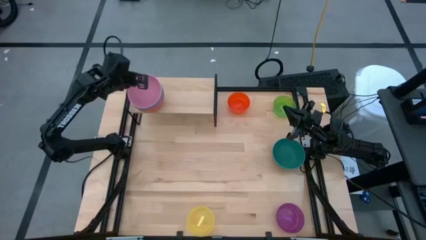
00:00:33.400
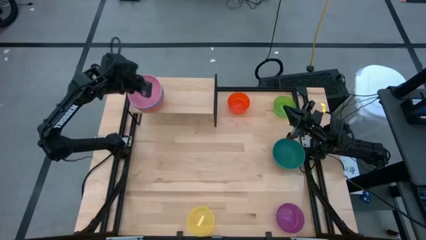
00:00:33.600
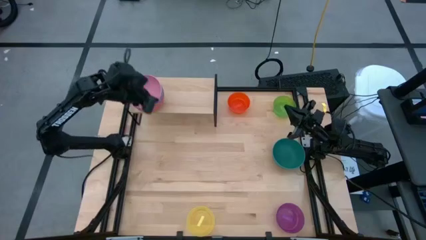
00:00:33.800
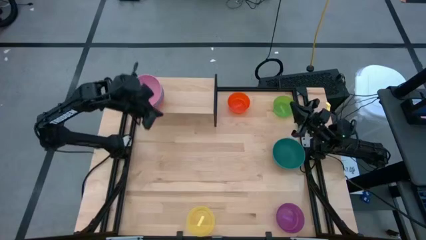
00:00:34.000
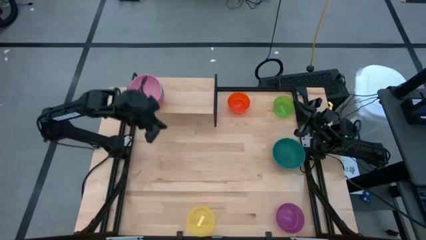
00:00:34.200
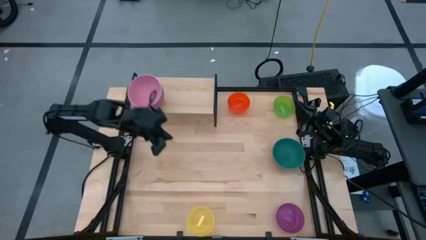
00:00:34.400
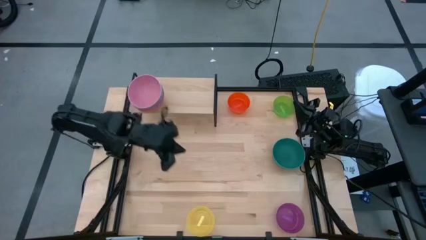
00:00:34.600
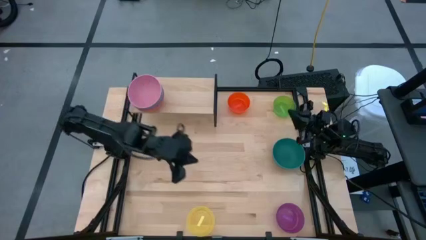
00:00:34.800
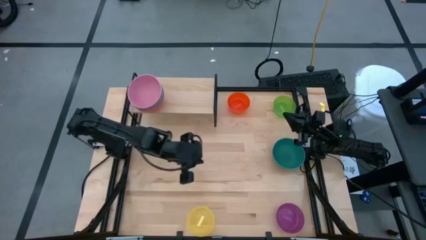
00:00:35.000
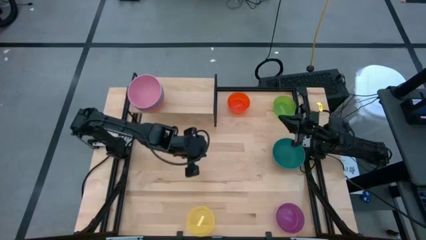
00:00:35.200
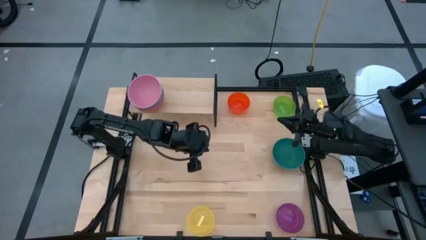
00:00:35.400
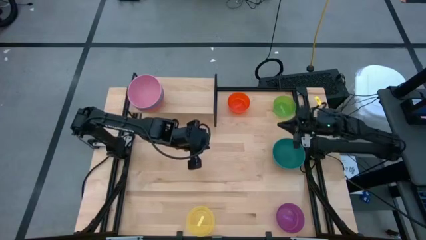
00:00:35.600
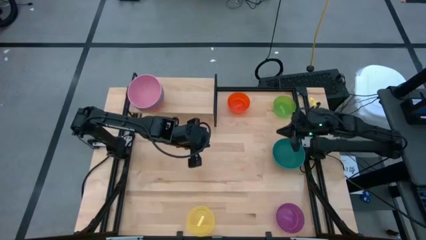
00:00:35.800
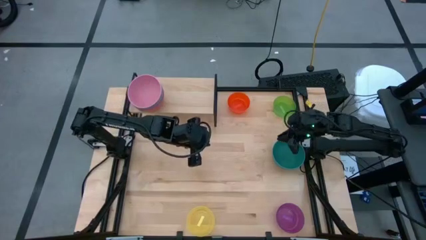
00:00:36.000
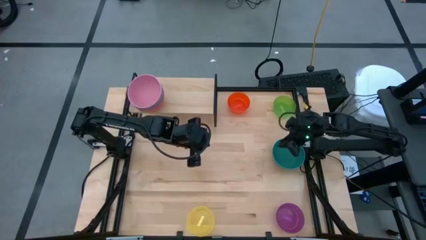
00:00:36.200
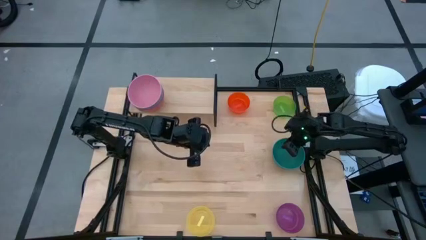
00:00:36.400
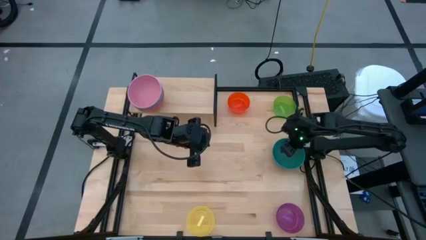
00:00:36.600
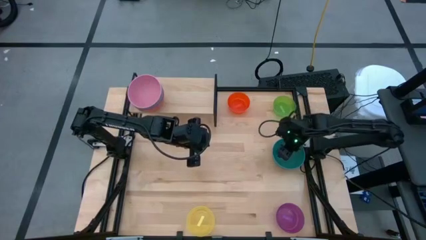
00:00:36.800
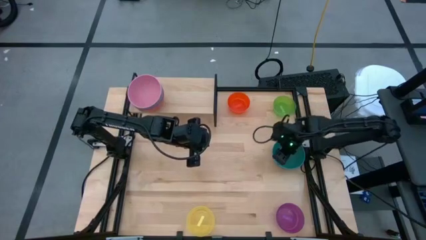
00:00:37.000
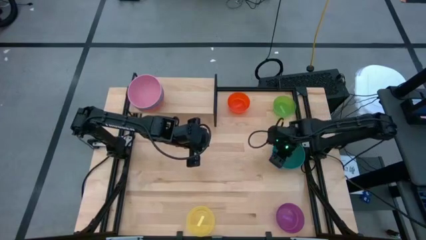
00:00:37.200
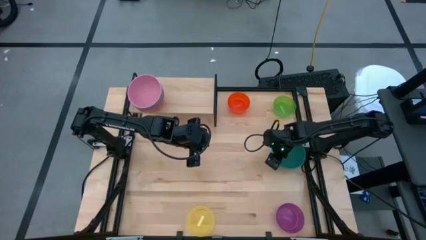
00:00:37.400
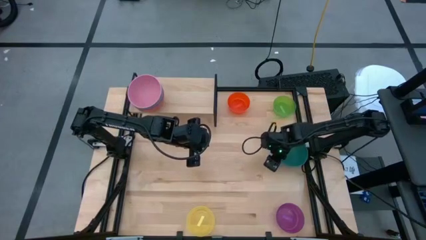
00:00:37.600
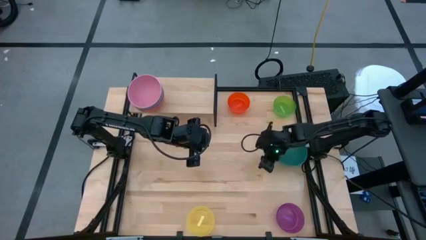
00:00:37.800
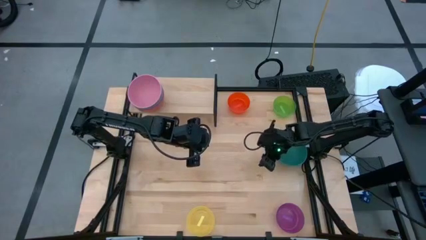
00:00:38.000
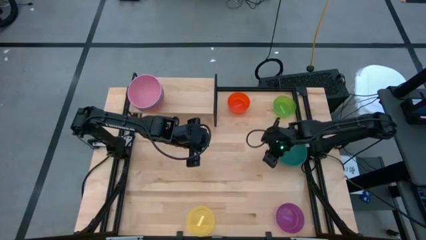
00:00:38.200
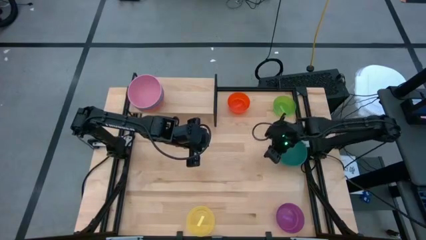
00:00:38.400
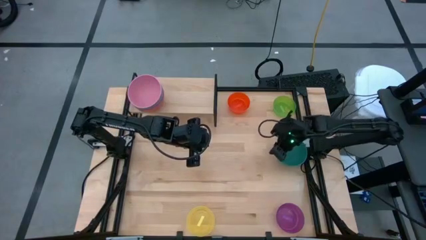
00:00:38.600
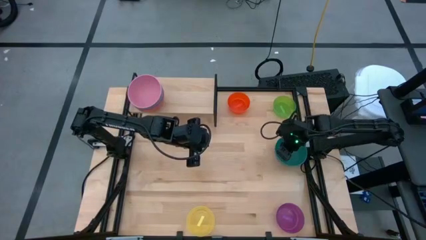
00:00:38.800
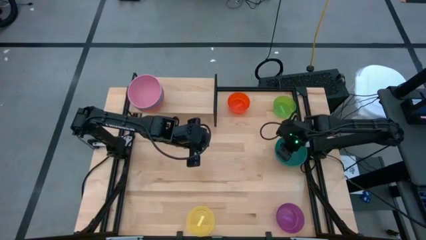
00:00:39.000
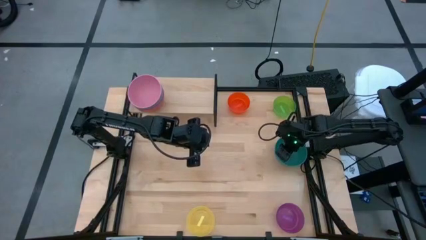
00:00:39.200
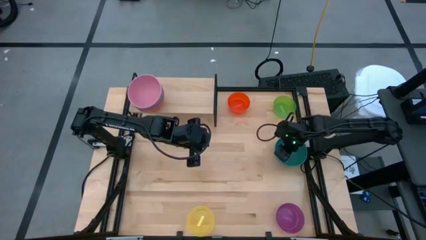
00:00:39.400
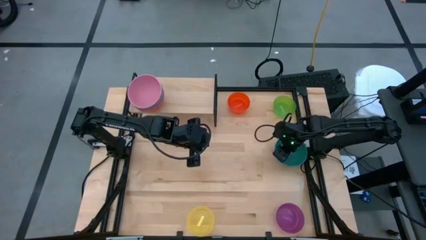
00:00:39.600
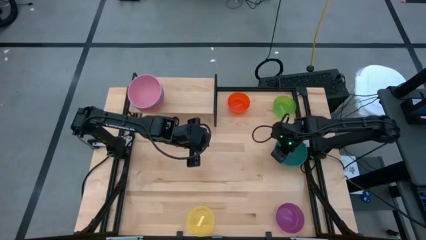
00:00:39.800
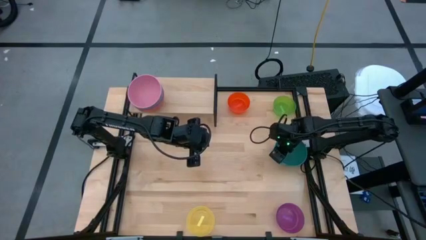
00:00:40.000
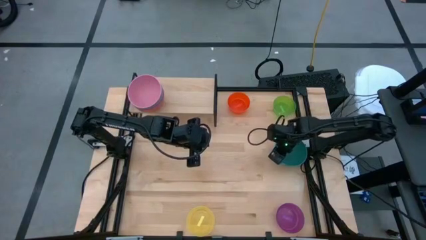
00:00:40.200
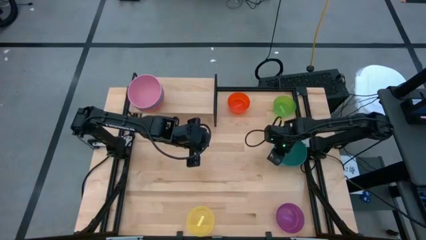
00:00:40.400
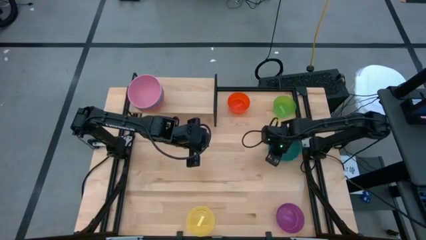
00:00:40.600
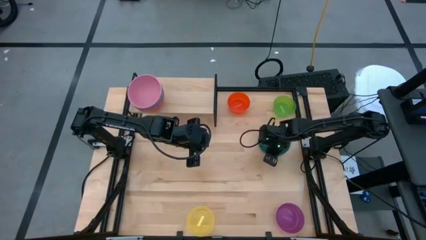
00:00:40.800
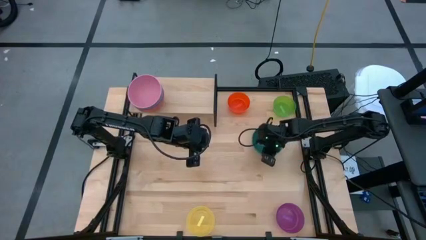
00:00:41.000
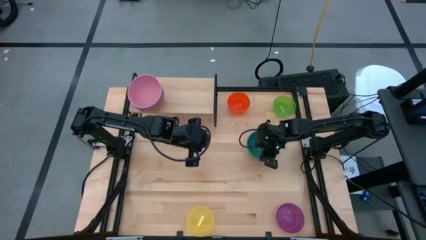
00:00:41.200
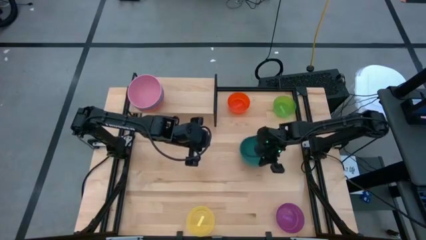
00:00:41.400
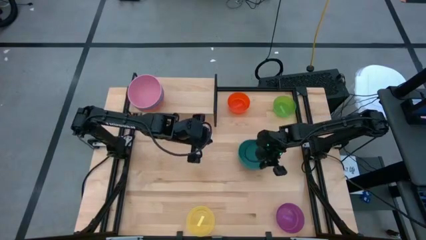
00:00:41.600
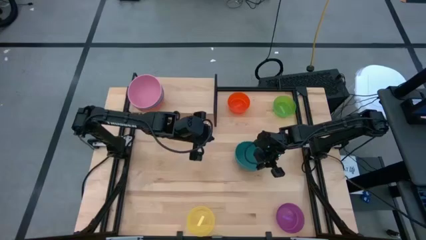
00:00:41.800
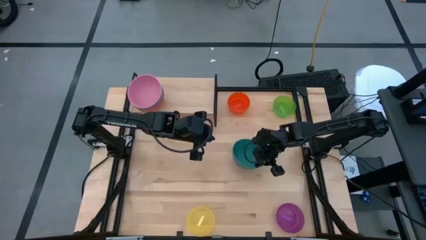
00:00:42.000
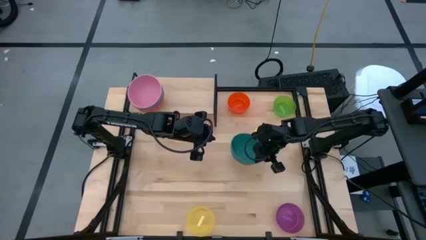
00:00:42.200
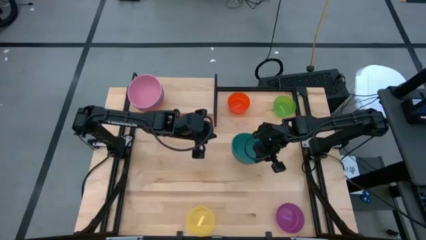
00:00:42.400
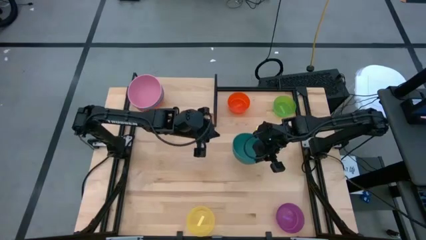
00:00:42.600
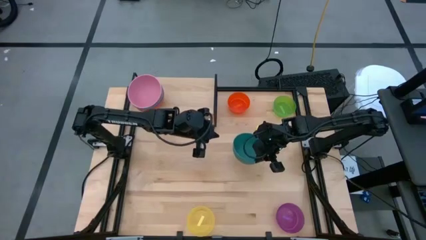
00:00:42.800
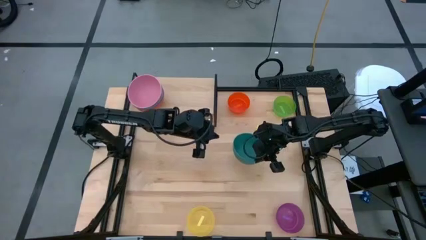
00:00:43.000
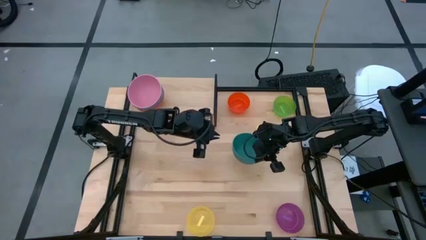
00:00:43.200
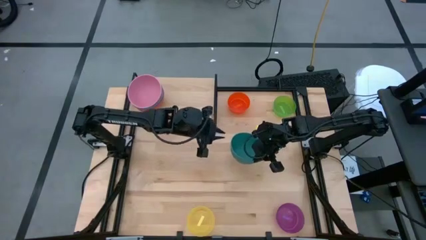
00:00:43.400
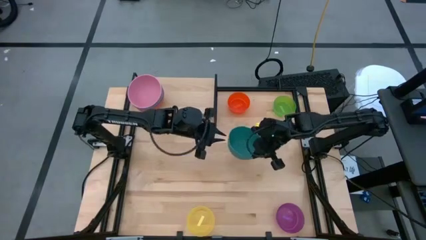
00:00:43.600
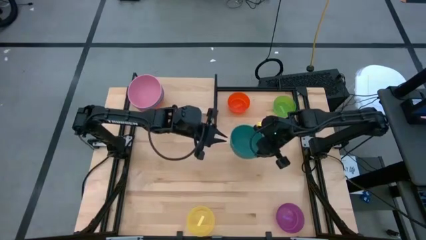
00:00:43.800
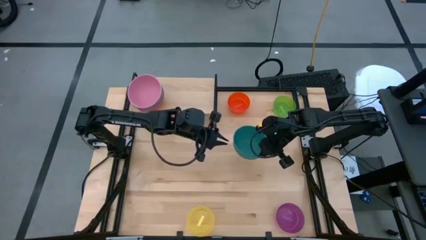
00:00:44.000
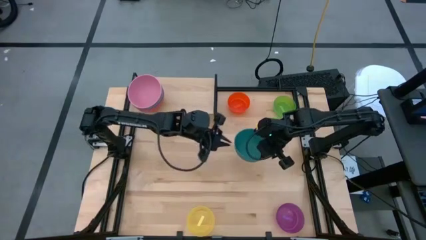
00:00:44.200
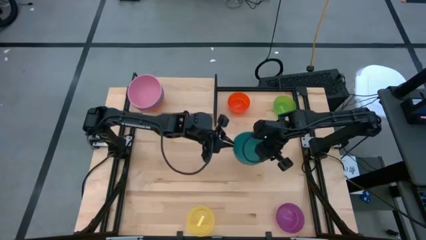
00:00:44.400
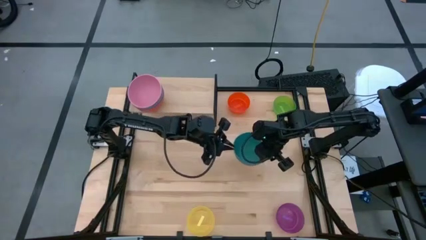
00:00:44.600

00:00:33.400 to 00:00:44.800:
Task: Place and stack bowls onto a shelf
Stack the green bowl on top of the pink bowl on the shelf

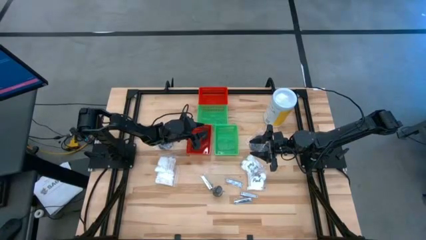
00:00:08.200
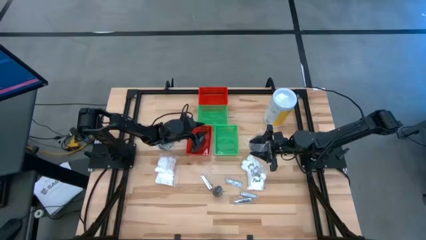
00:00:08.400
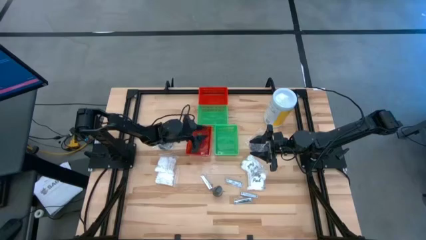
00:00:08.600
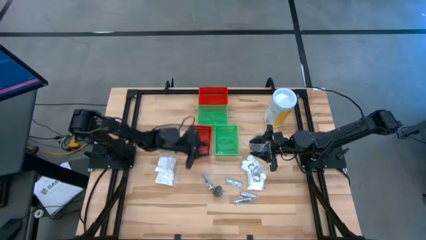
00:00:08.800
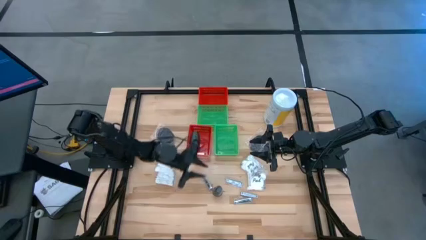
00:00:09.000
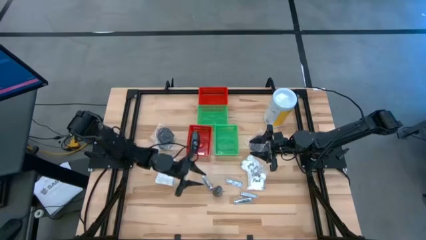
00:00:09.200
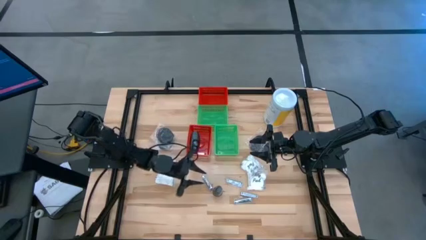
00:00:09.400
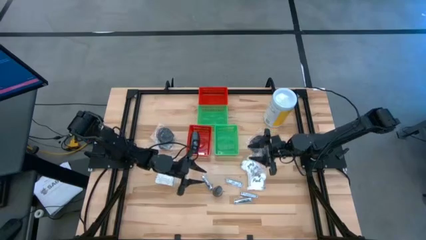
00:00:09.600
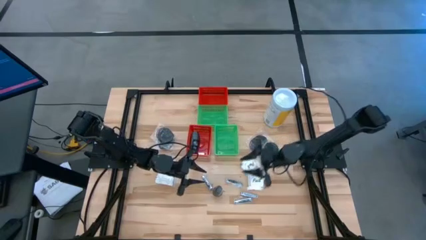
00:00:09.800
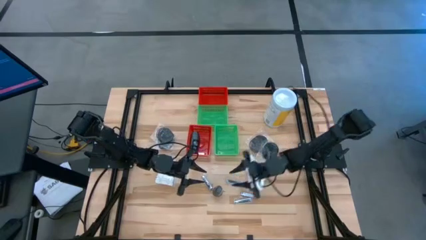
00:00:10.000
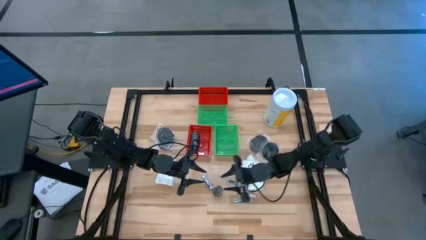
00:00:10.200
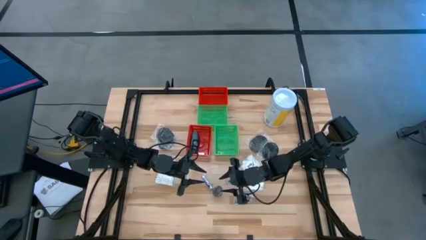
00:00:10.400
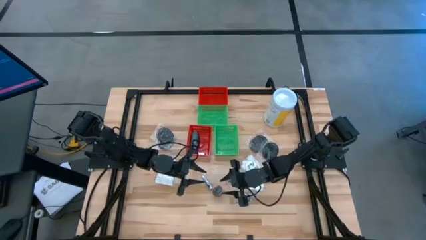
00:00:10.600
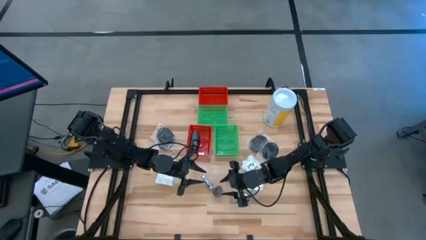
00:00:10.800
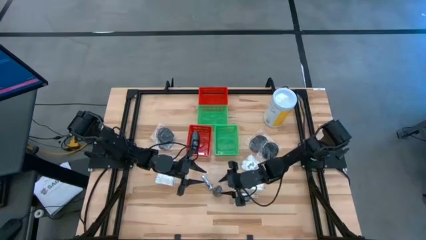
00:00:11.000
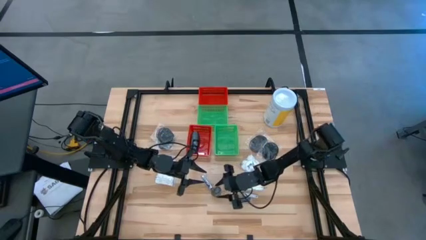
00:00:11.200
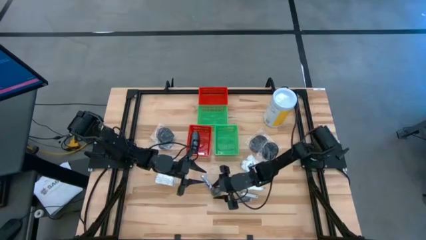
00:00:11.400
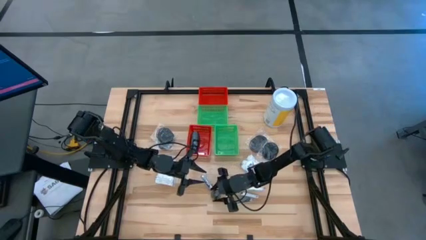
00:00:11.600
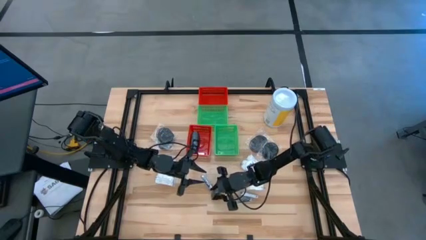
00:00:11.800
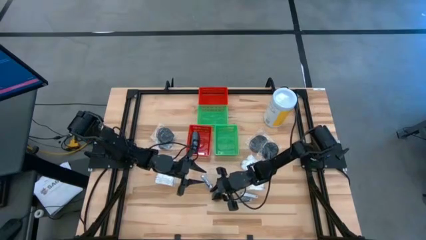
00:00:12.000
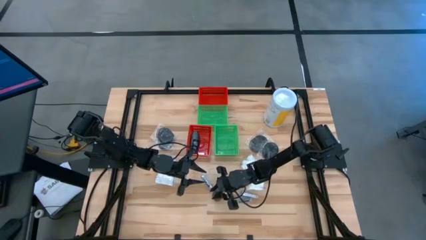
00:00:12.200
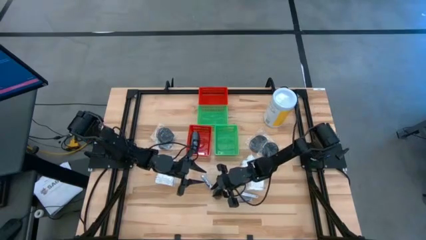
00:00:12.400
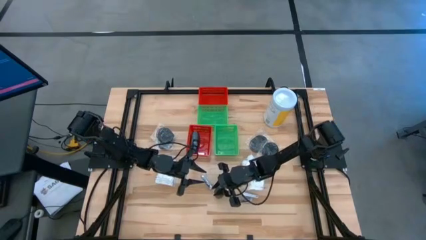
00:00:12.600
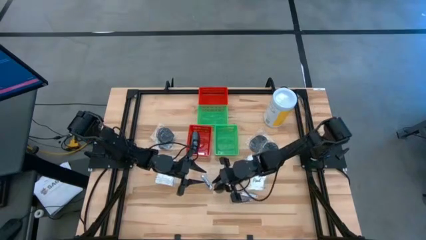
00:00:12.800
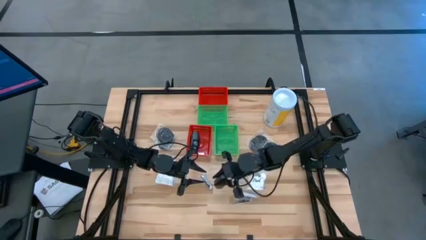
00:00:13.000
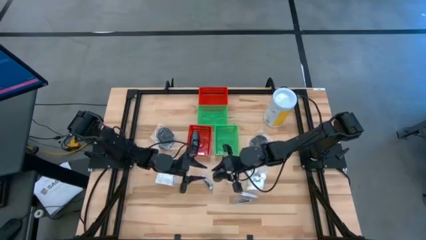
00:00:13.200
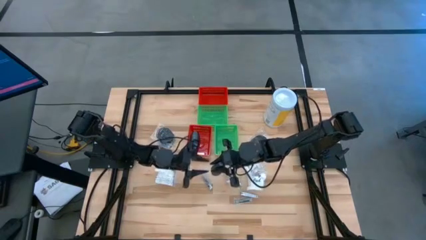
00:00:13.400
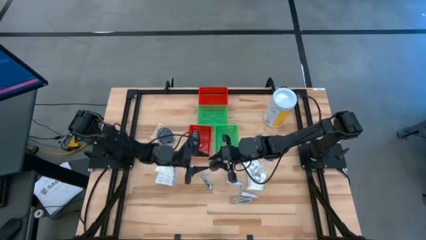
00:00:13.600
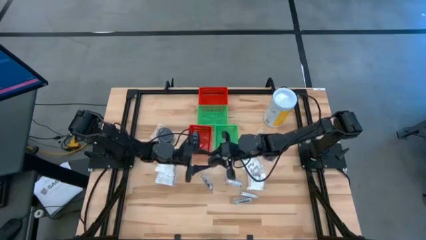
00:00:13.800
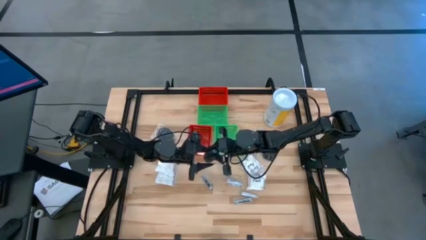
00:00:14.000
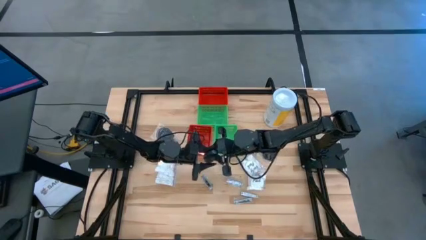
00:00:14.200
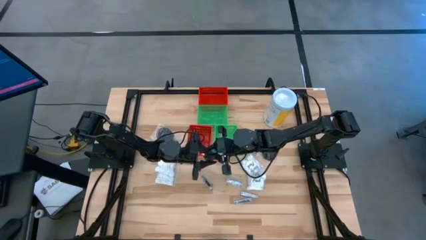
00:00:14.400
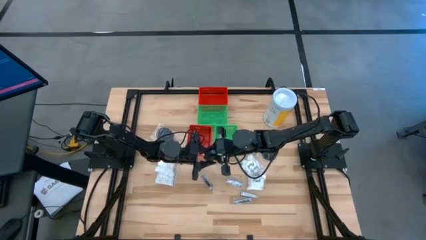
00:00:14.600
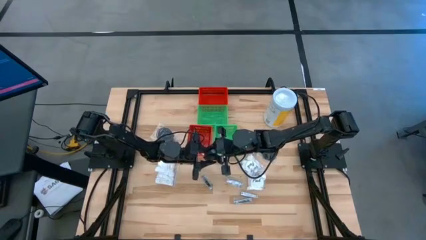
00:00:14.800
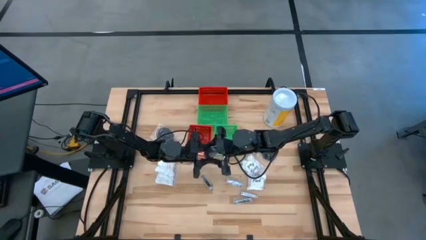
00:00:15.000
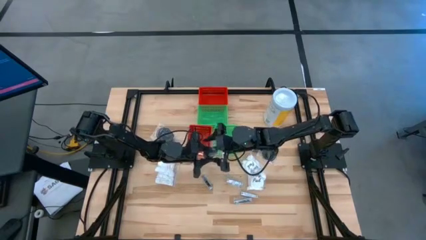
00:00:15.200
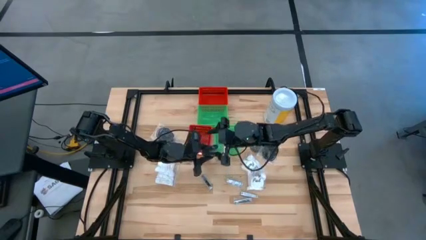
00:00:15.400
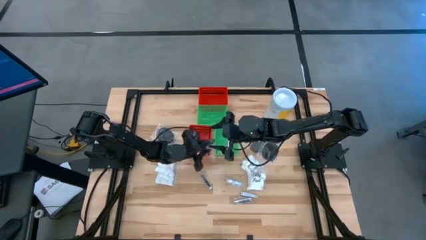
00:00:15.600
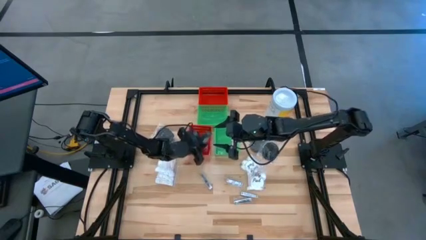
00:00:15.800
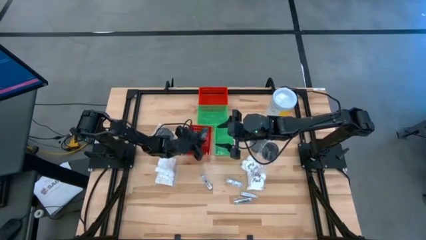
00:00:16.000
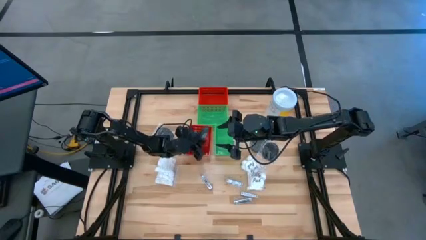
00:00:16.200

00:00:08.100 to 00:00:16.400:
Task: Pick & Place Travel size toiletries
Put the gray deodorant into the bottom red bin
